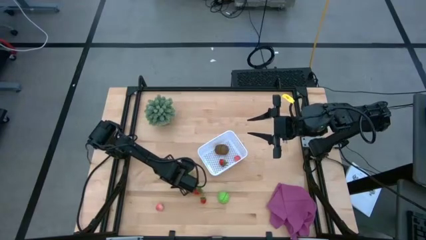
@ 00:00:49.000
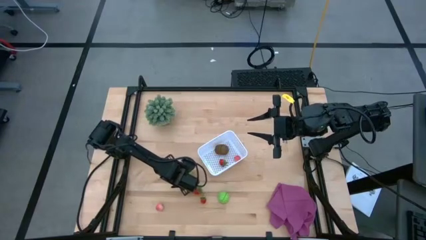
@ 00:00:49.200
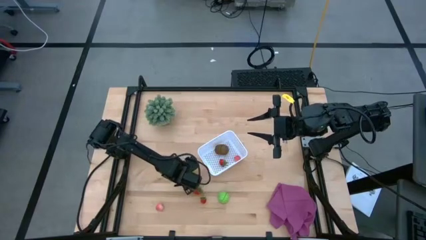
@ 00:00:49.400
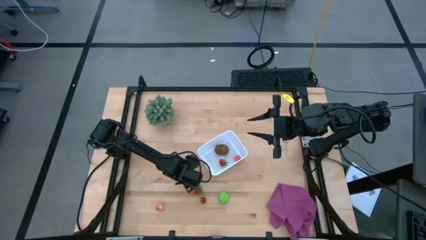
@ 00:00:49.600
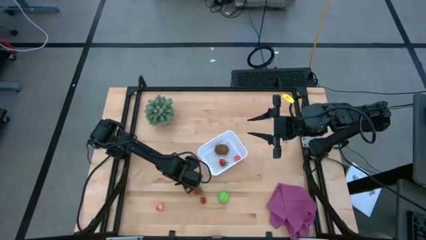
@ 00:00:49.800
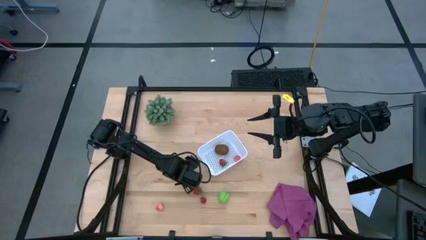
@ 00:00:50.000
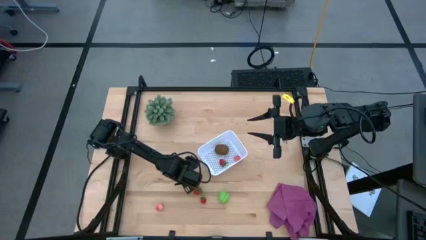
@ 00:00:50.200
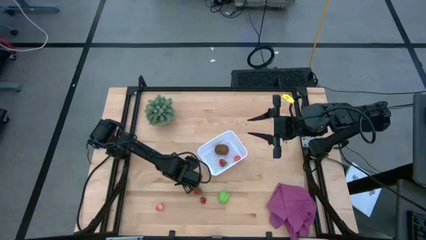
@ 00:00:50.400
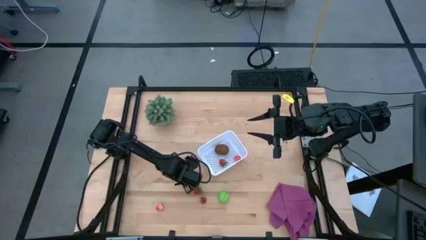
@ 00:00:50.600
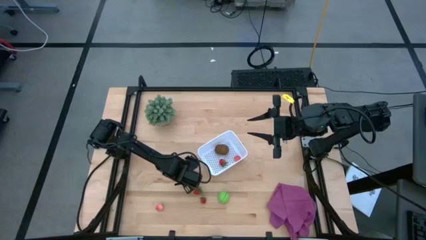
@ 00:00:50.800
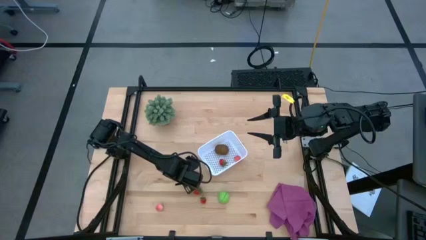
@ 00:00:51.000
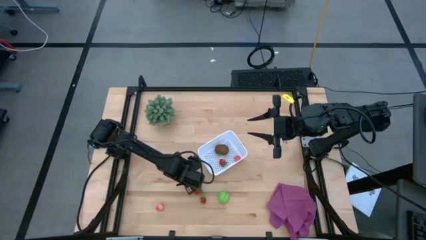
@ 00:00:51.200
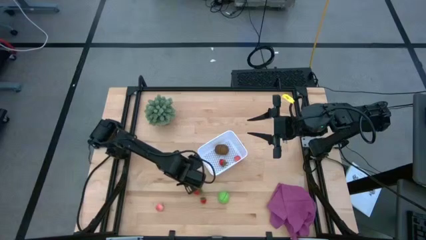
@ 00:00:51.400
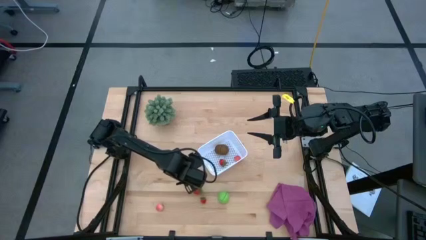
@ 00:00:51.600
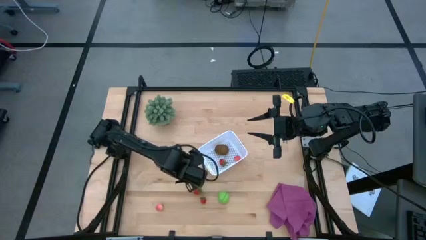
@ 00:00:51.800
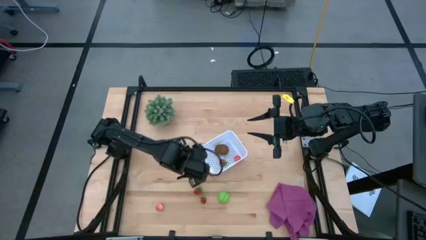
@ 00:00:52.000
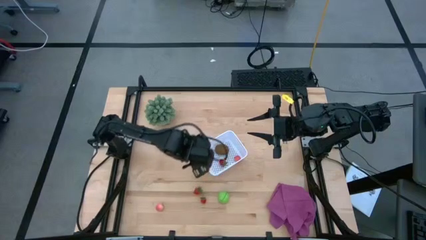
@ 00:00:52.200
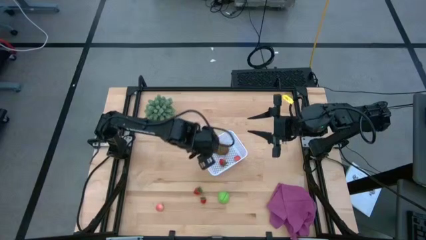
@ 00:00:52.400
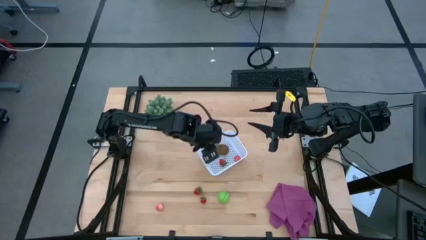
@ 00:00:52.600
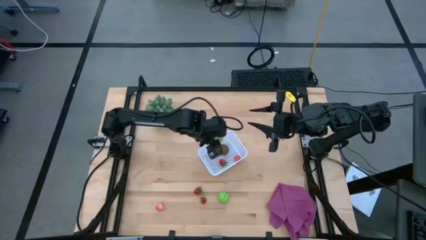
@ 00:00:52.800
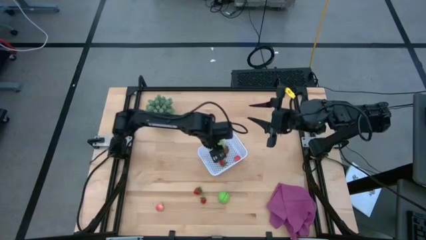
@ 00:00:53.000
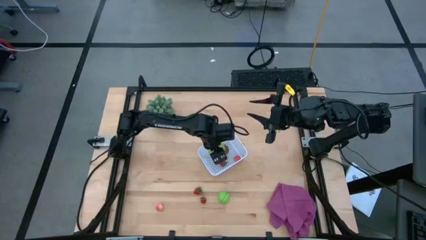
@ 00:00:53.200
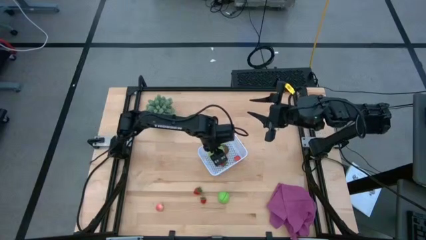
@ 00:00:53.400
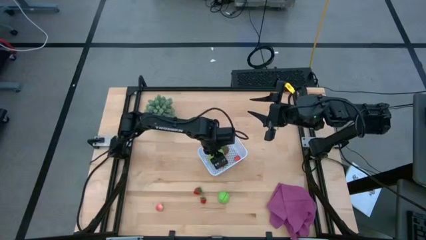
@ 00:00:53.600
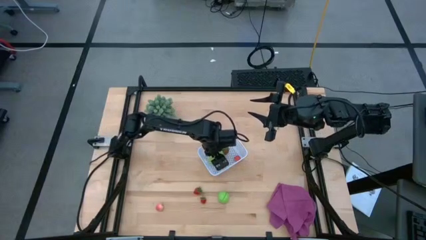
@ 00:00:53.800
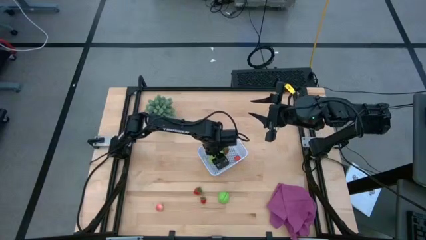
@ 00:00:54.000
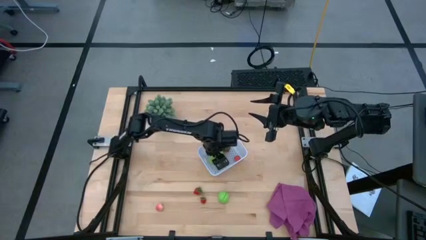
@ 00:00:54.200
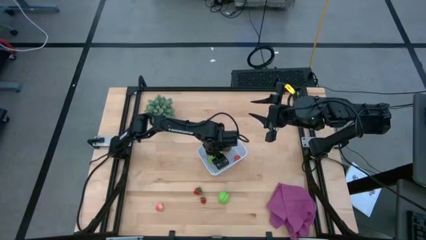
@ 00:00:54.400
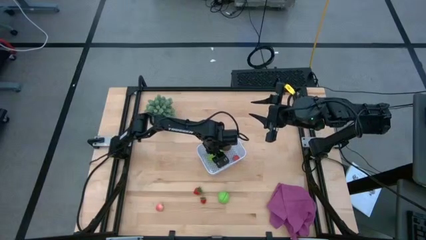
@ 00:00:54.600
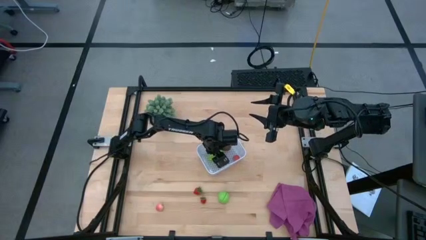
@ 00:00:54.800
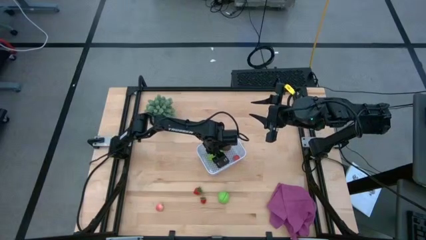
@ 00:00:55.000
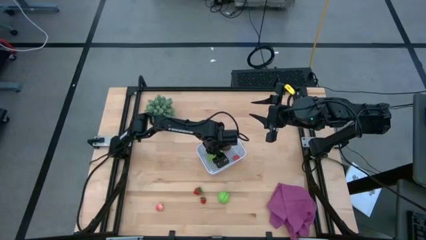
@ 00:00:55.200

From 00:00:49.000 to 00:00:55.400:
Task: Pick and placing Produce into tupperware
Put the starfruit into the white bin

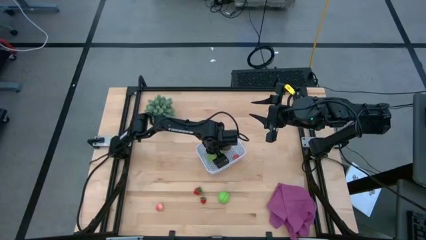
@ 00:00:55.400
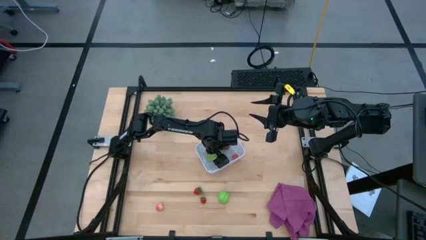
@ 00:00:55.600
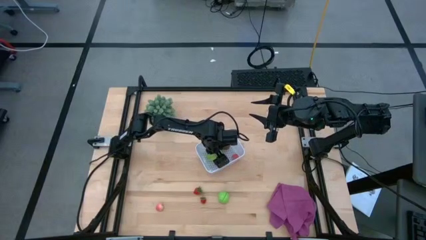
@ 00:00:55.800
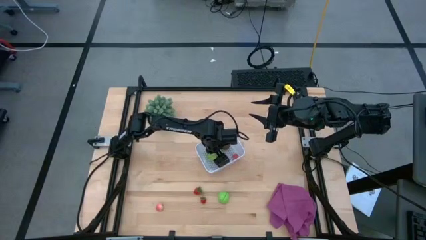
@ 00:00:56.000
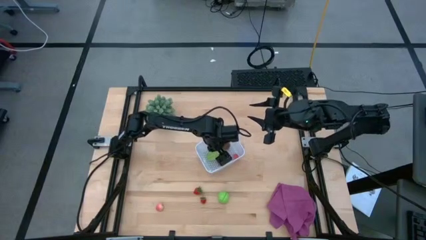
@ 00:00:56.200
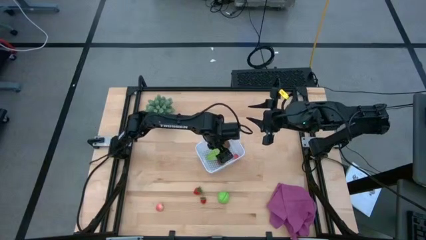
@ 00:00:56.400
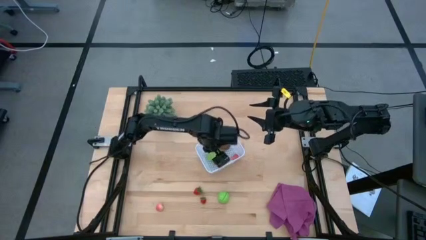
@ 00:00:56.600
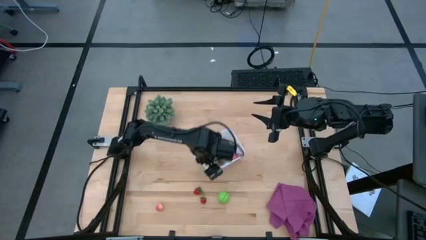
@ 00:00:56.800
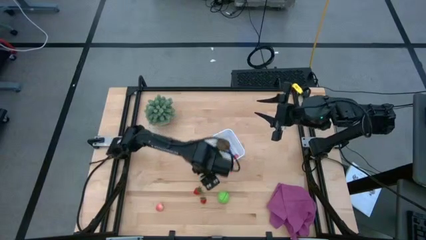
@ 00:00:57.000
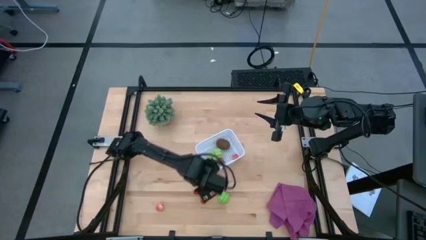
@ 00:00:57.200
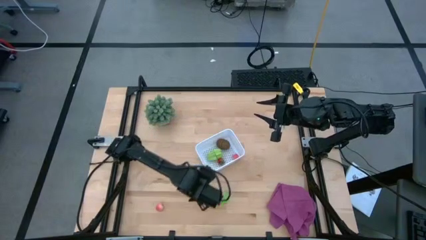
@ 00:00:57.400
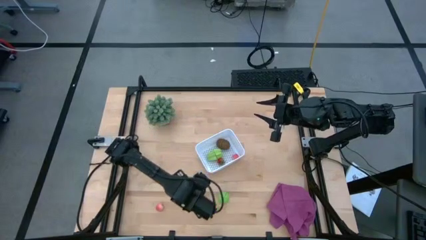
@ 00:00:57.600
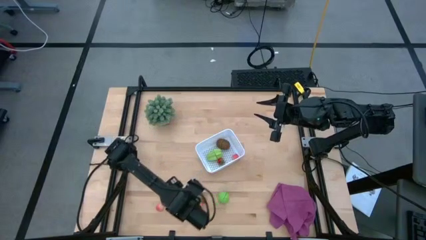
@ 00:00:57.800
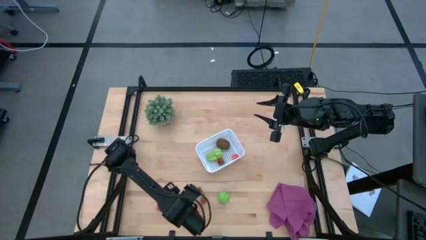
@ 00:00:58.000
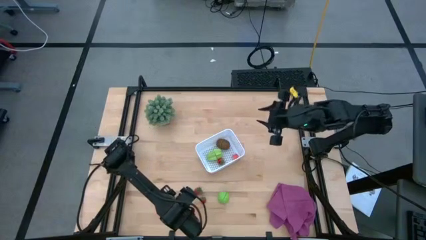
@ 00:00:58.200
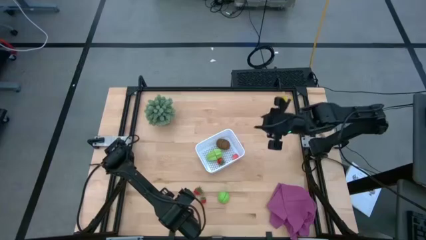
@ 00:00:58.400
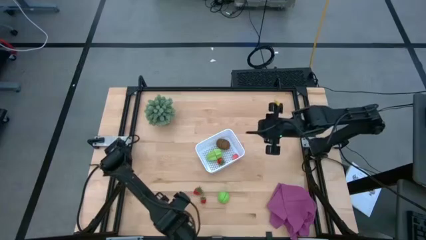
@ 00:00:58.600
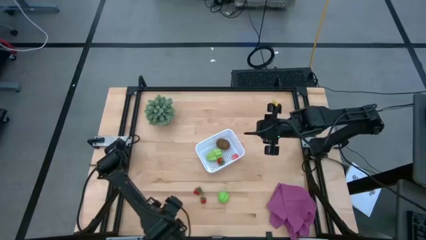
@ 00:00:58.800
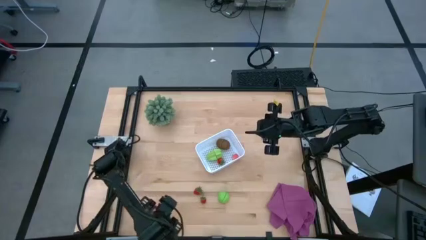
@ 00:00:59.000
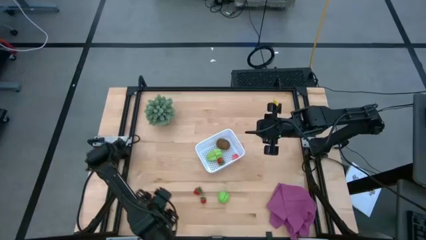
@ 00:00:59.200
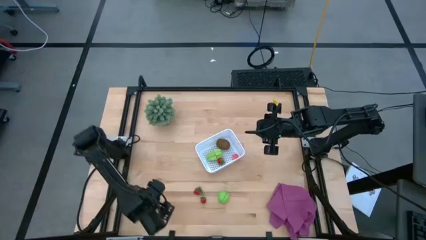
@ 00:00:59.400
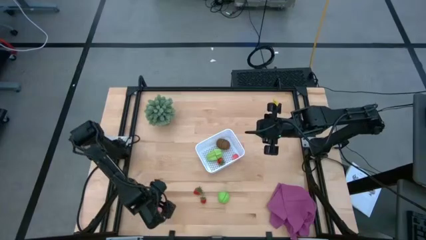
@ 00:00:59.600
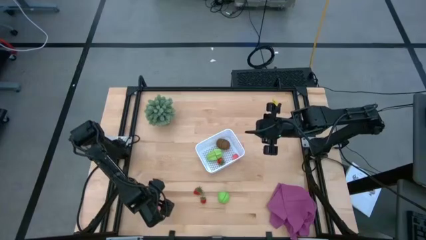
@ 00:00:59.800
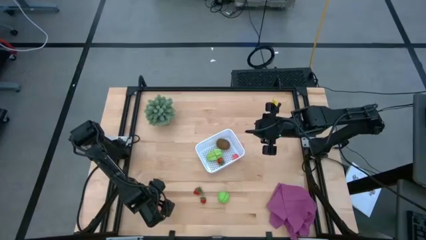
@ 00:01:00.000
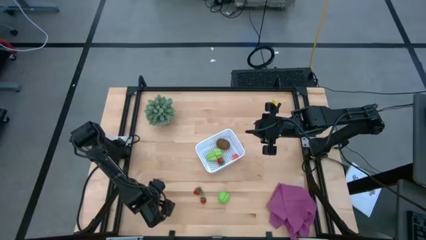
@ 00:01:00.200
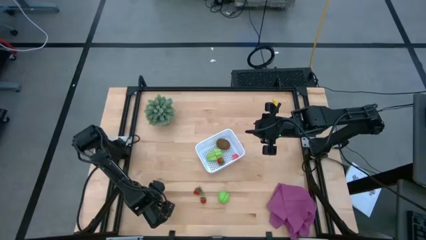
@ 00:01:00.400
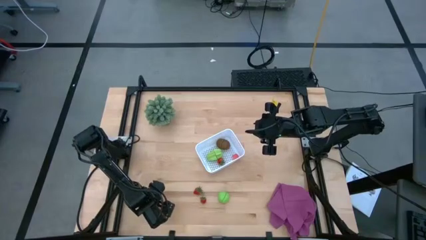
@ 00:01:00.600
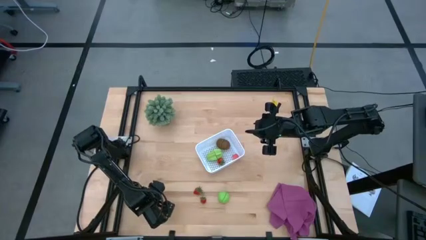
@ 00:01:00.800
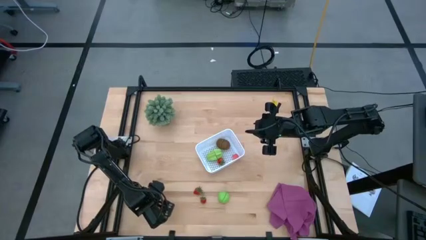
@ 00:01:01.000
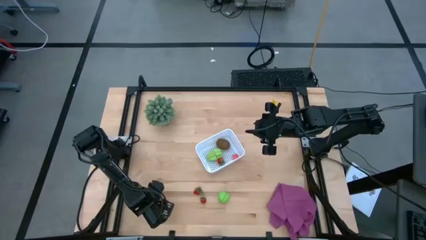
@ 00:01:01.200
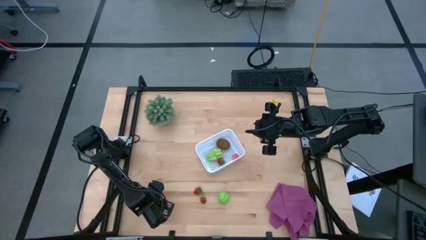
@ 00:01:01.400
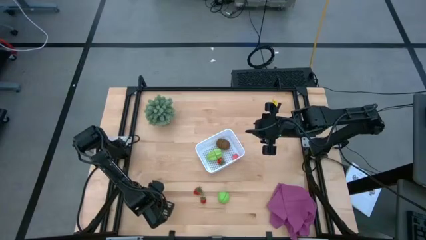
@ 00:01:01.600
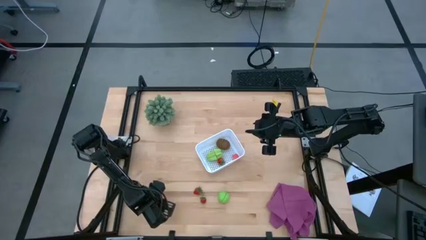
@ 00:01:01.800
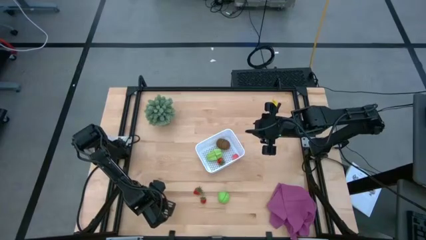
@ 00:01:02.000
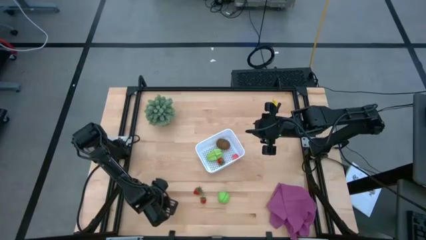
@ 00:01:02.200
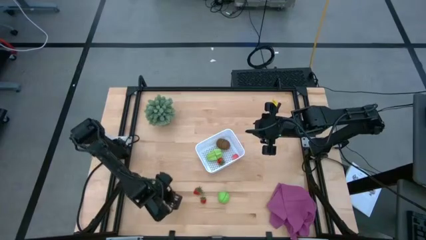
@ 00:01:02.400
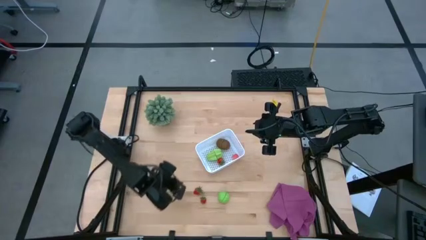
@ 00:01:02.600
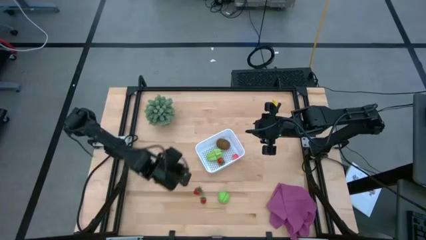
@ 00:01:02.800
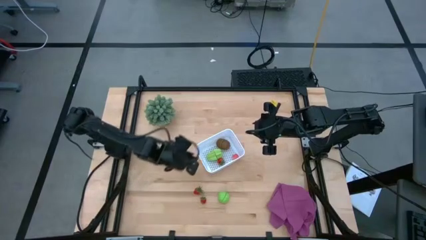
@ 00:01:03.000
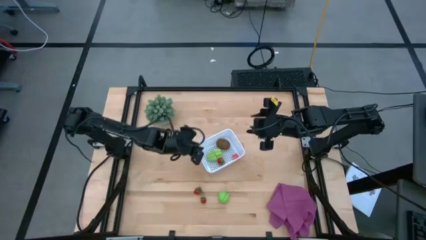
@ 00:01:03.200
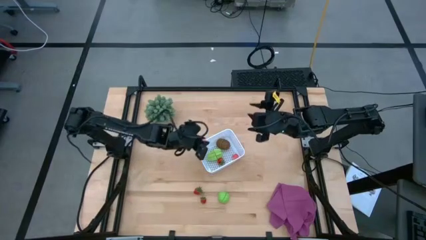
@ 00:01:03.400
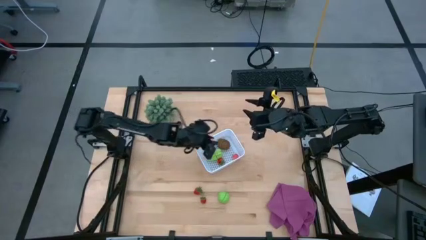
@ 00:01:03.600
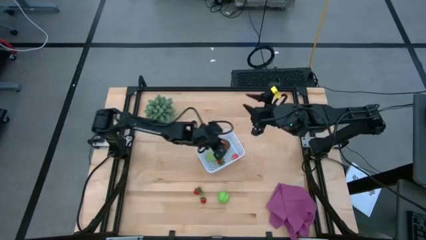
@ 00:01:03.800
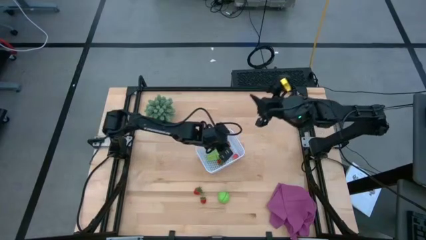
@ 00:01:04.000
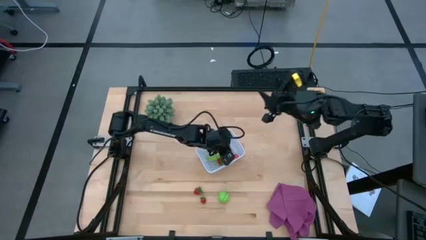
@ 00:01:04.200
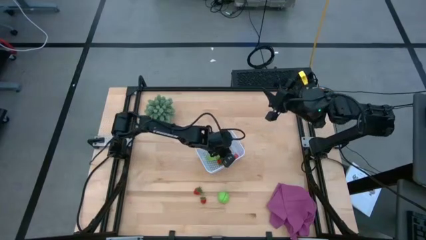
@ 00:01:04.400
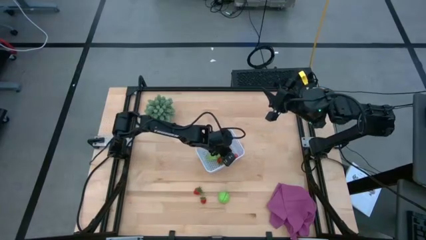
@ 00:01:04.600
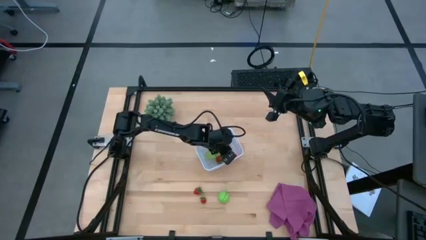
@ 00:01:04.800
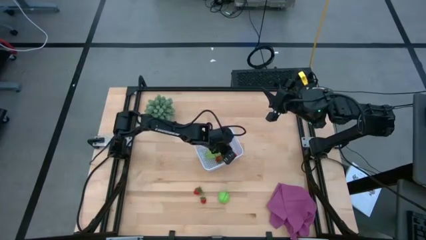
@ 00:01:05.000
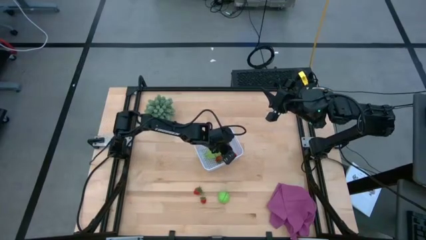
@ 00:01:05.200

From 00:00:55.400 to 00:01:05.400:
Put the peach into the white bin
